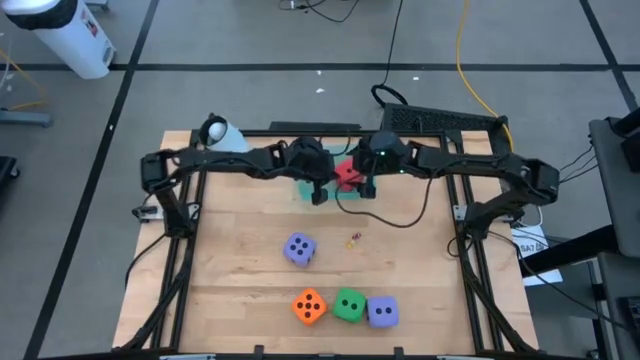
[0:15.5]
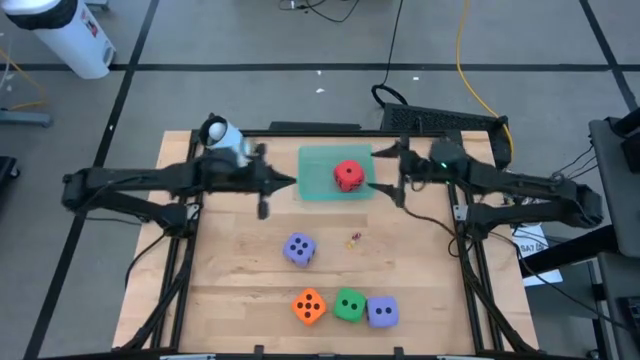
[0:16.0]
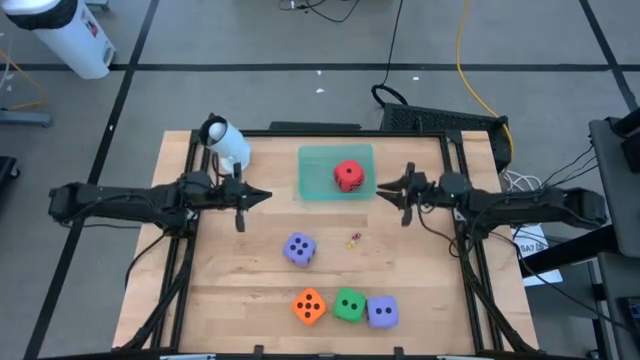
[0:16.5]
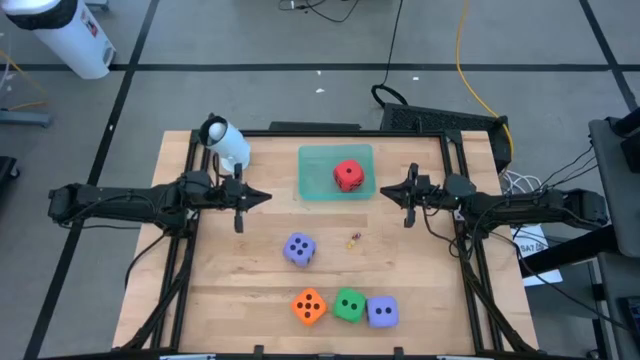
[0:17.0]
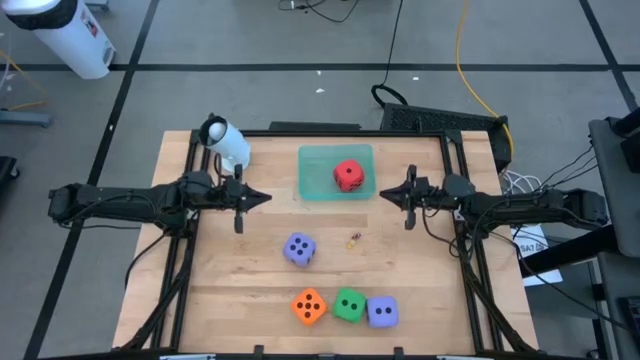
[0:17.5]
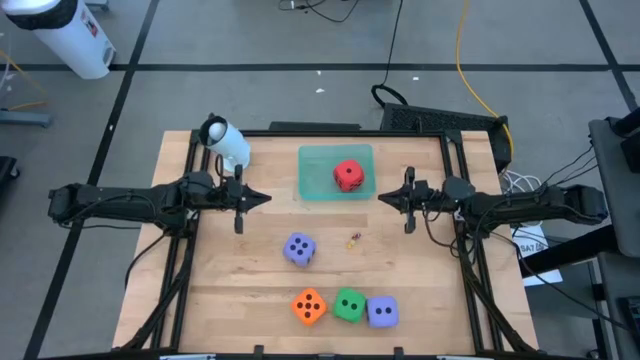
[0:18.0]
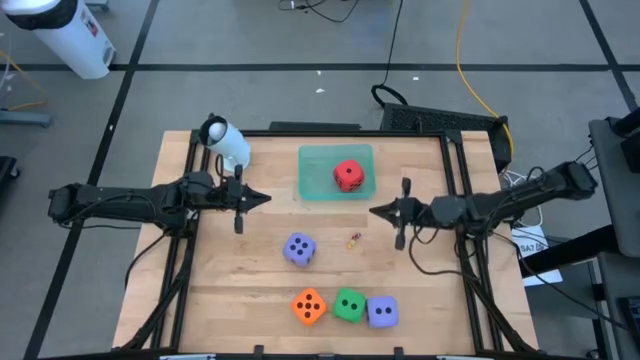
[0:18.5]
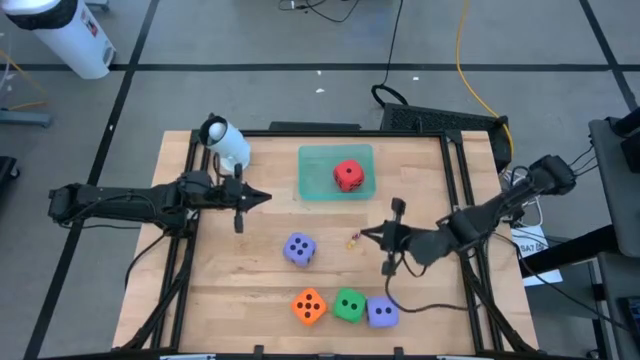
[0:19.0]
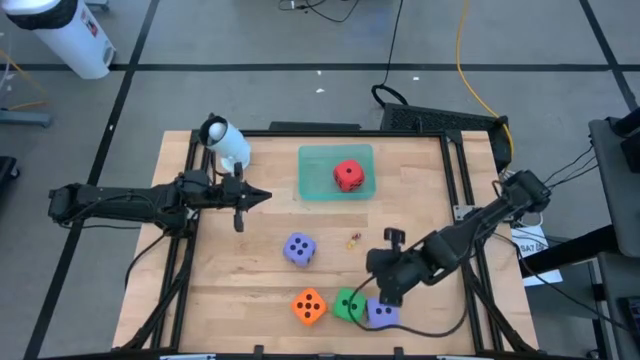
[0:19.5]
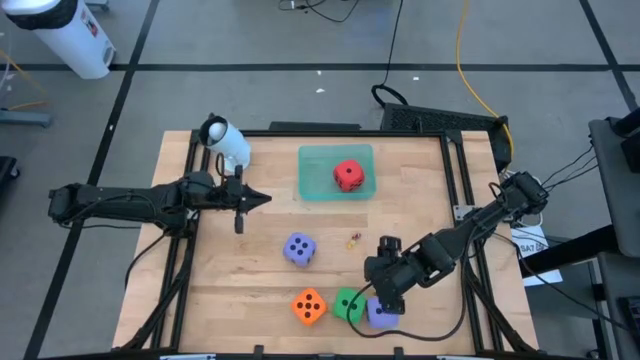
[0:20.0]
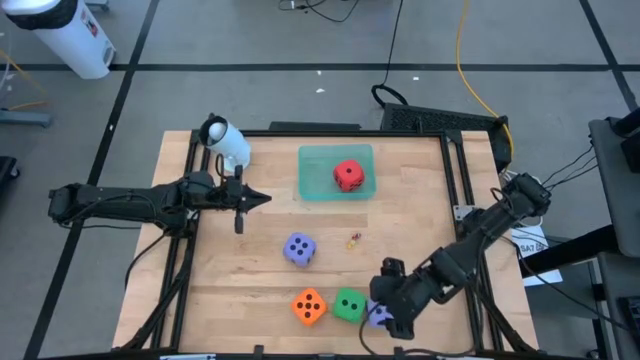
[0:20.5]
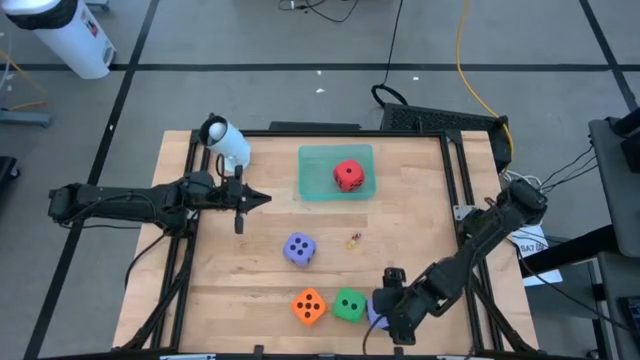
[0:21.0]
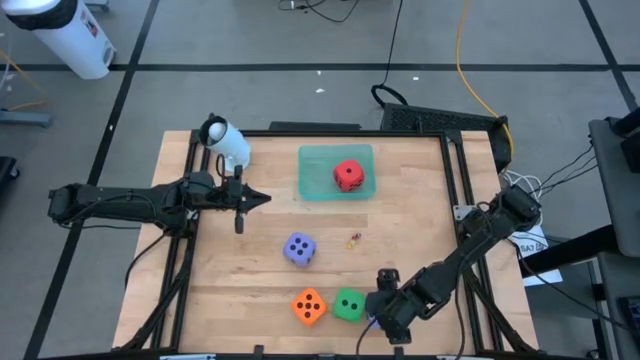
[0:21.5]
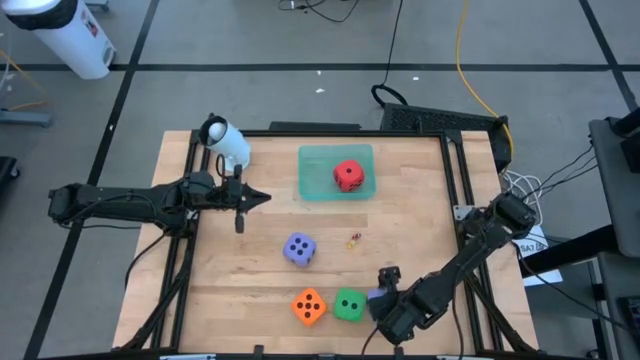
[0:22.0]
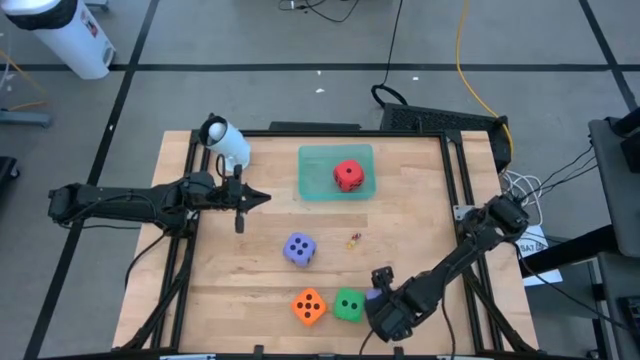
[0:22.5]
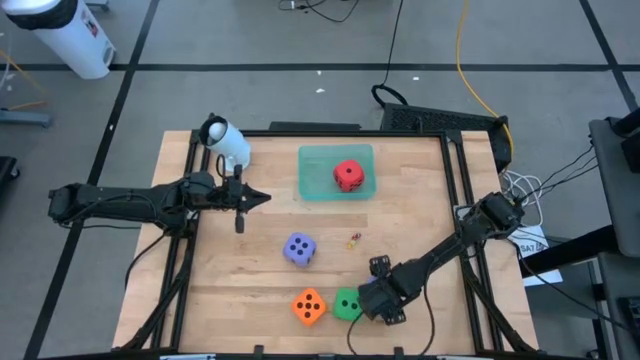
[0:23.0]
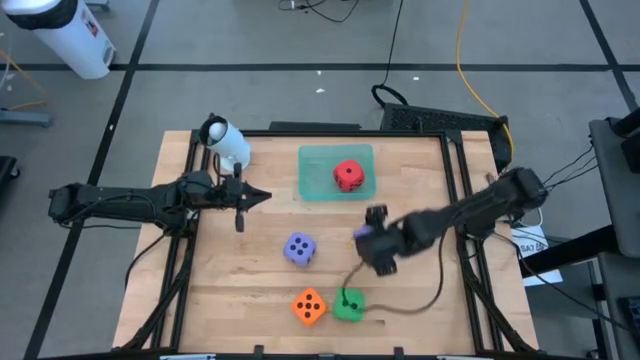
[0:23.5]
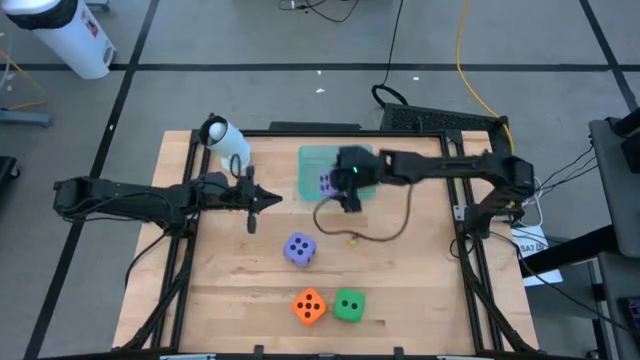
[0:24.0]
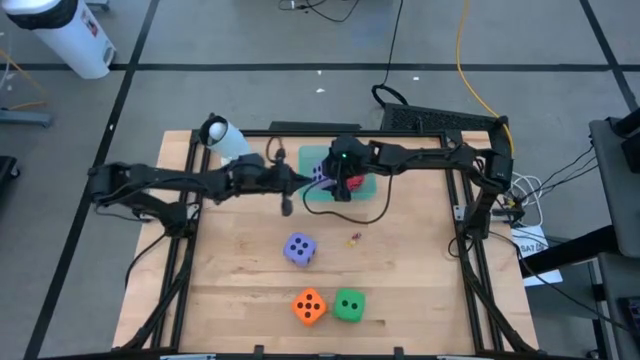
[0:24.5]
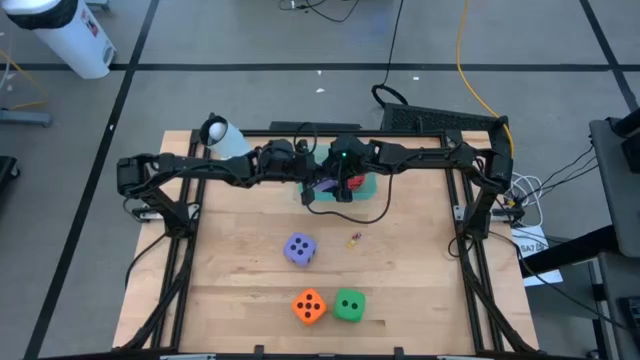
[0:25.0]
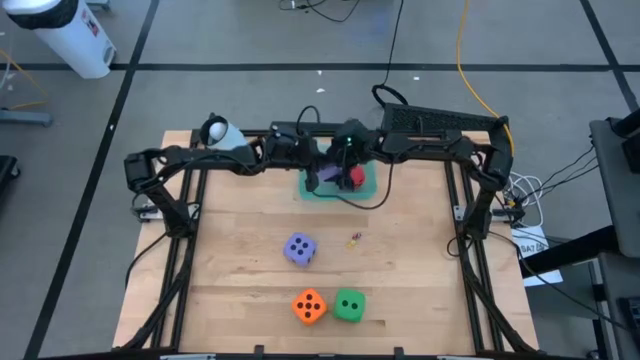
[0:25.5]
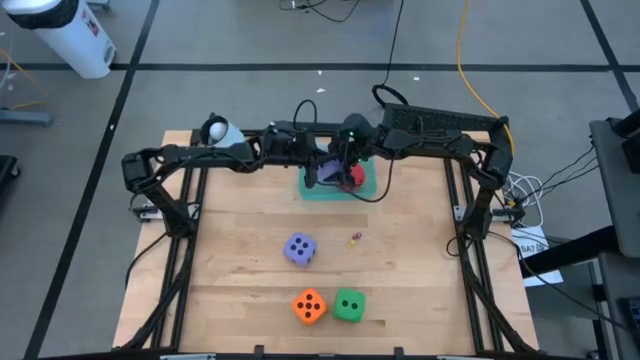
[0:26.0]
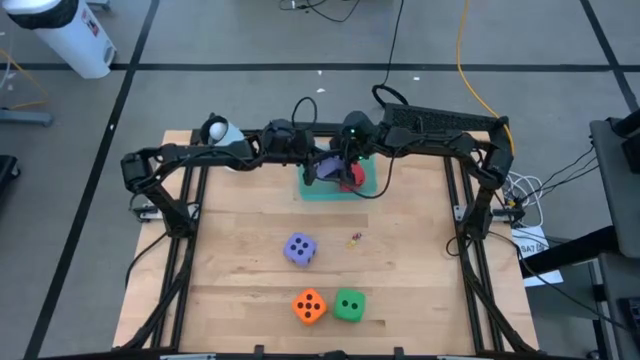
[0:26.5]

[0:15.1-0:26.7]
Task: Pick & Place Dice
Put the large bottom right purple die into the bin

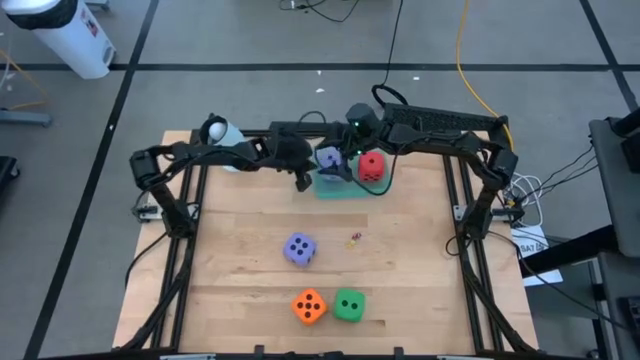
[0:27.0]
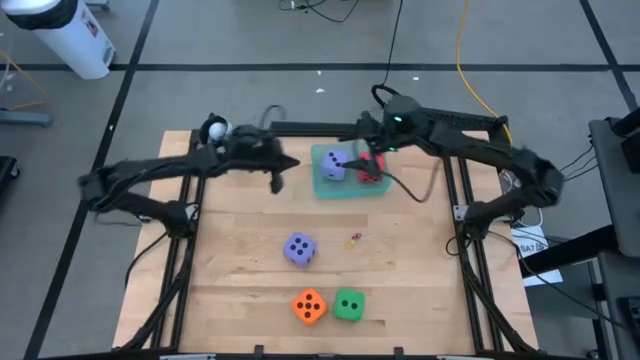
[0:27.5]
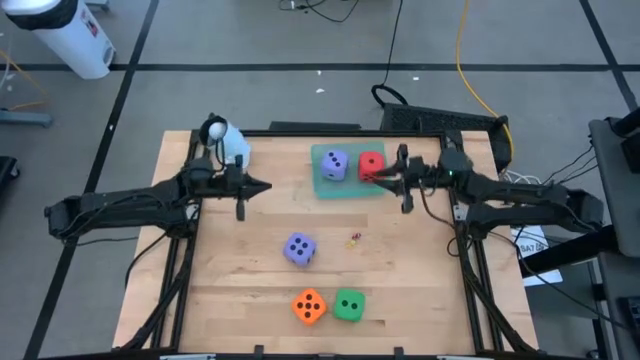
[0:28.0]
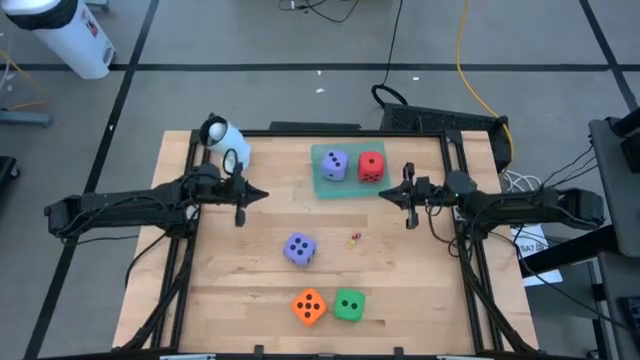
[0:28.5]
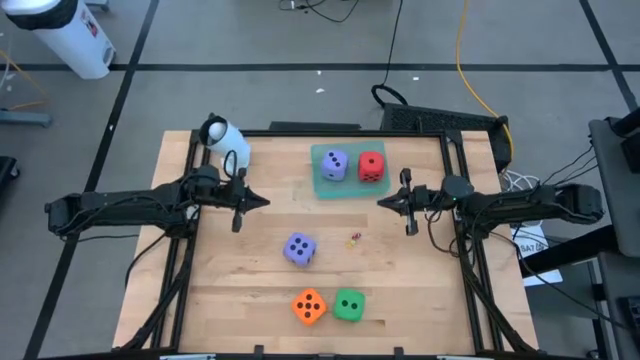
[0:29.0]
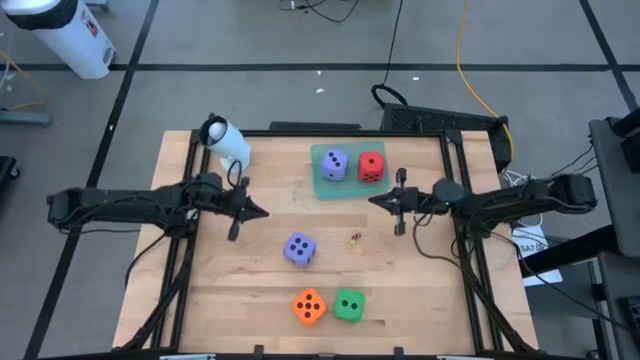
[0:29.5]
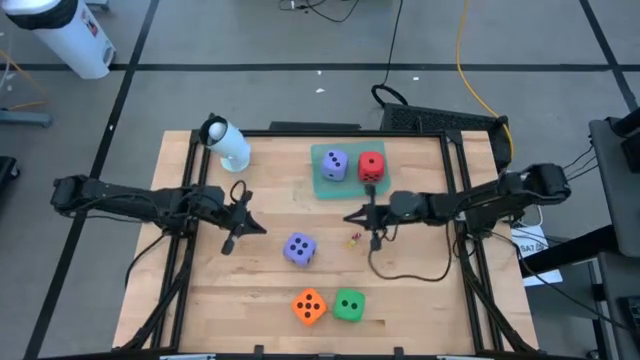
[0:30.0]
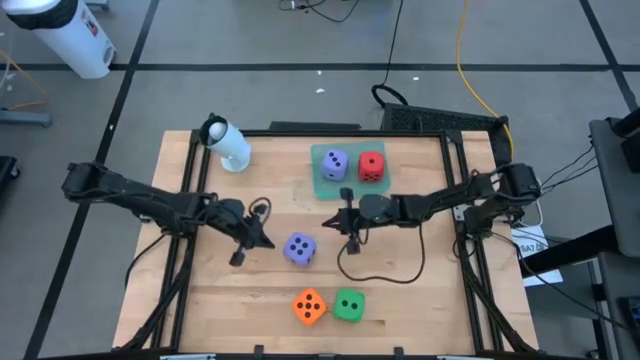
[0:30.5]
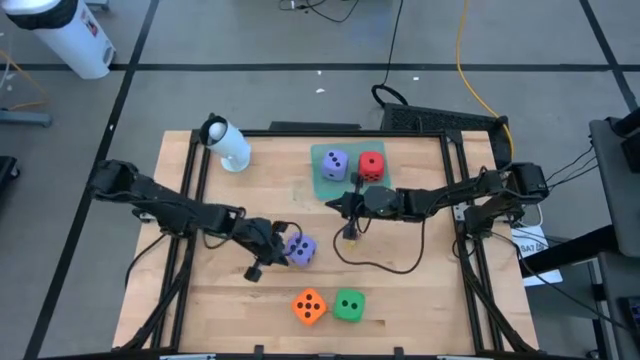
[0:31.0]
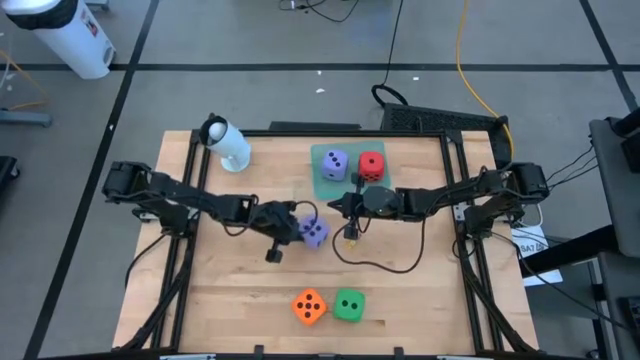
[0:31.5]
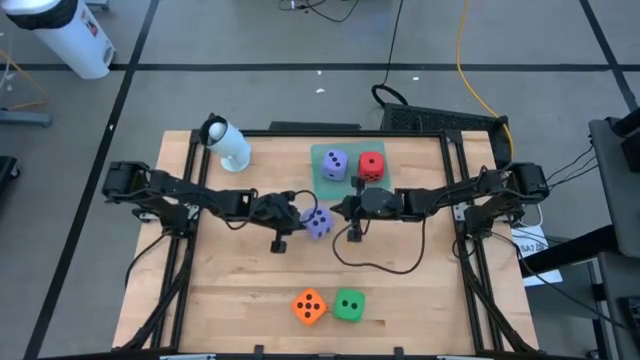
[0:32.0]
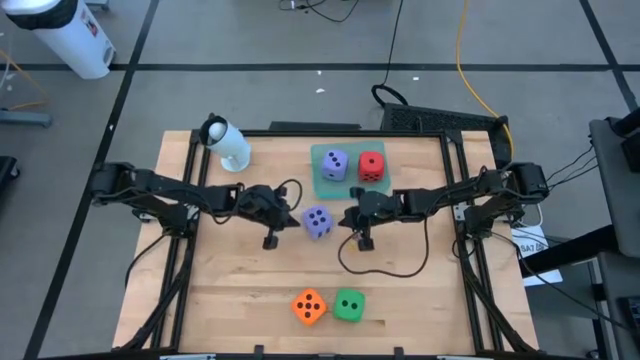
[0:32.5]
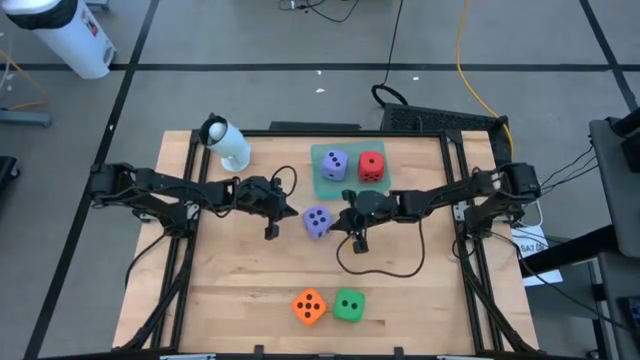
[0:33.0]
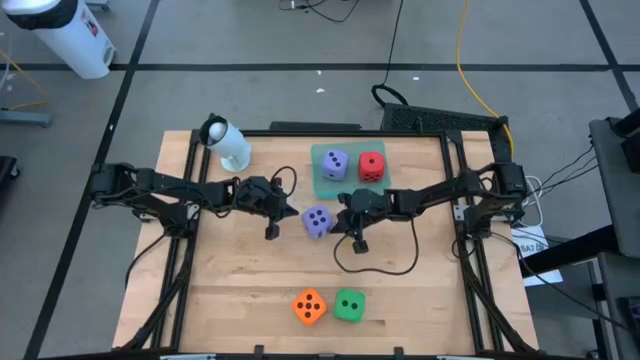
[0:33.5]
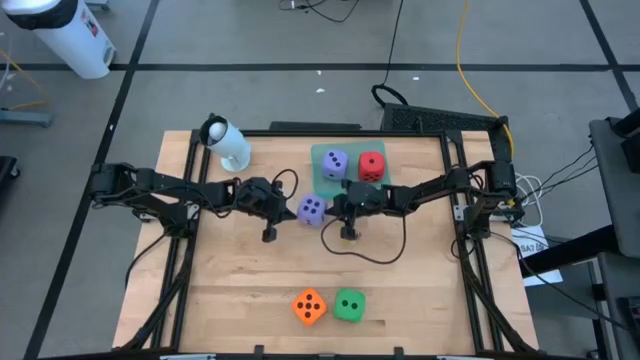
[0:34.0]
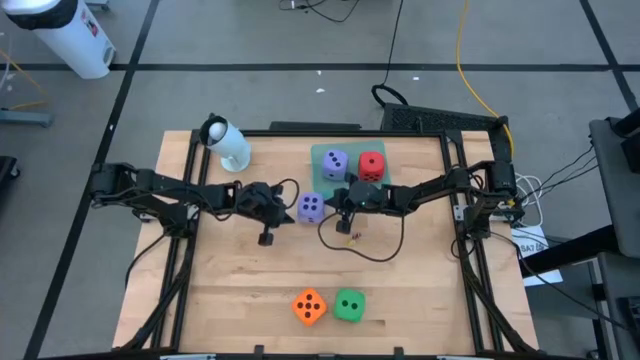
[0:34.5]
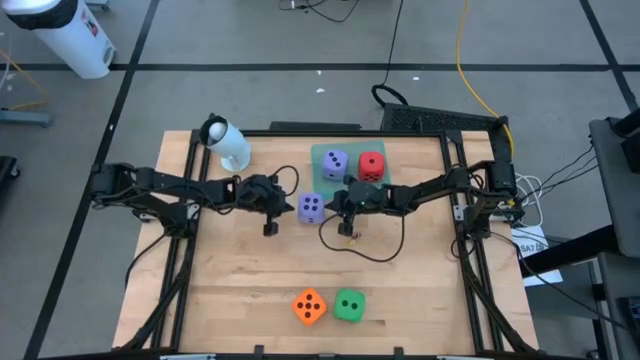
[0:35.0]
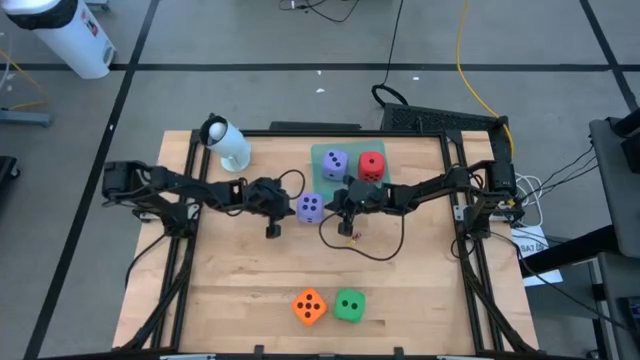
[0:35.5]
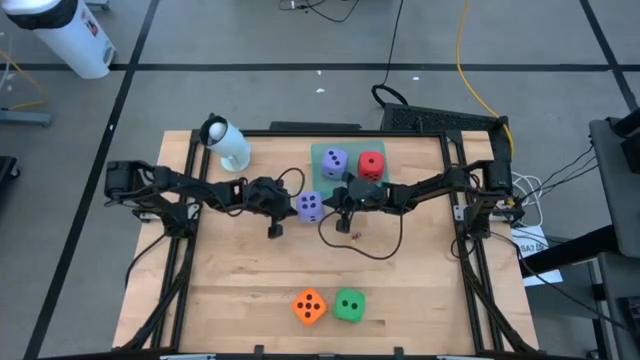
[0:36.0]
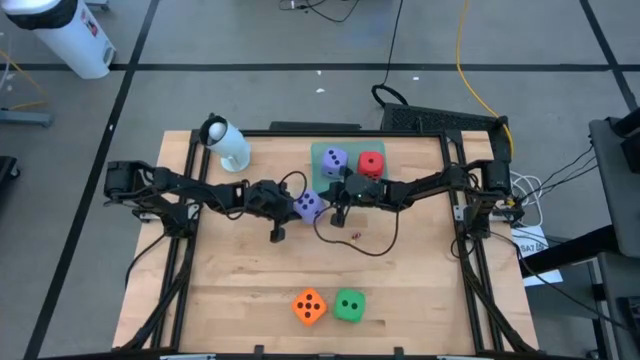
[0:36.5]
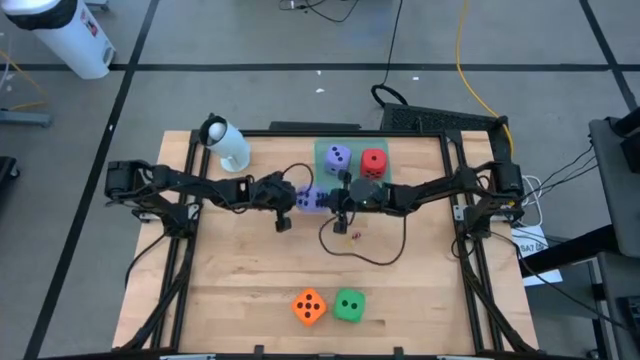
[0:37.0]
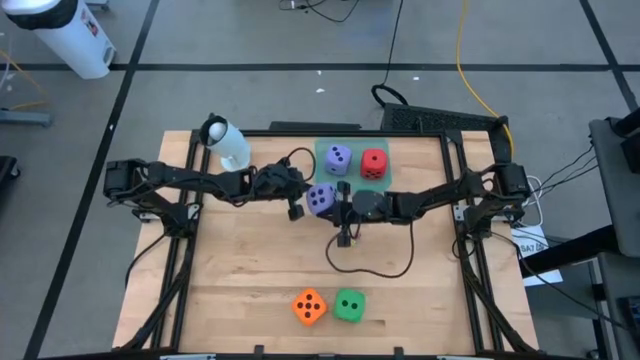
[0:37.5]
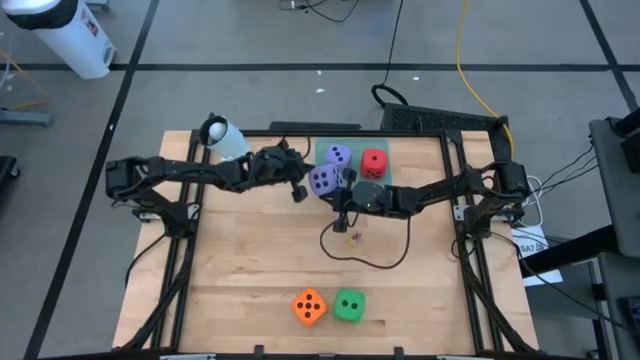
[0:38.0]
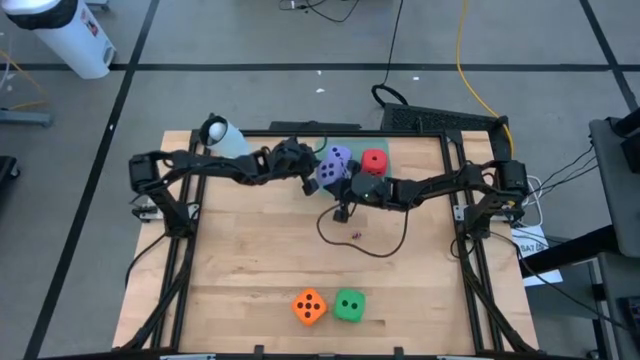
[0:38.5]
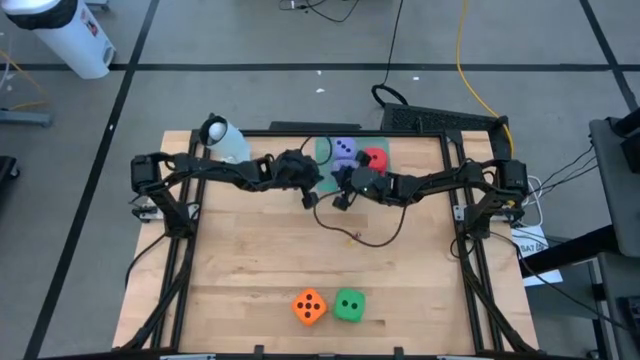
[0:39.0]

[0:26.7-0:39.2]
Put the large purple die into the bin
